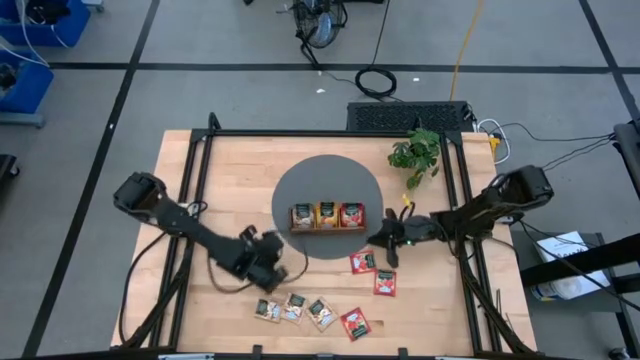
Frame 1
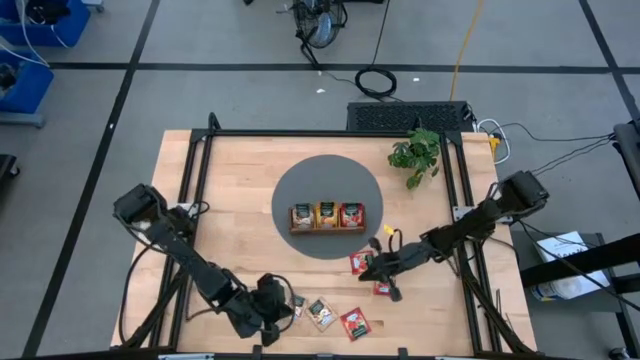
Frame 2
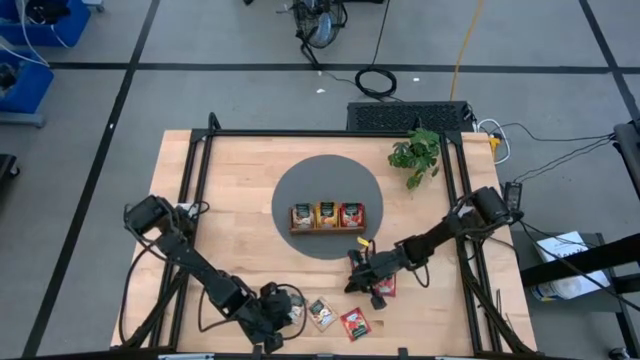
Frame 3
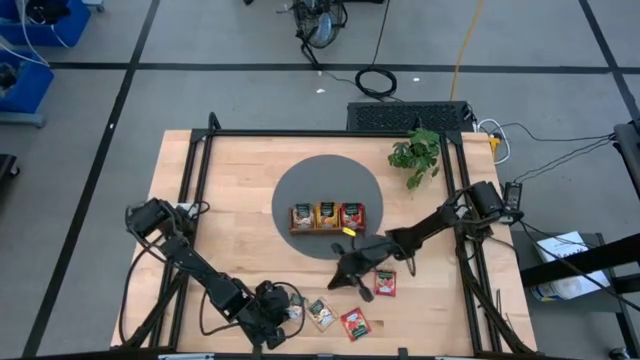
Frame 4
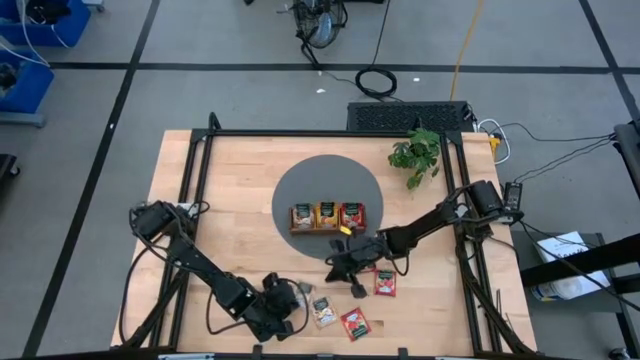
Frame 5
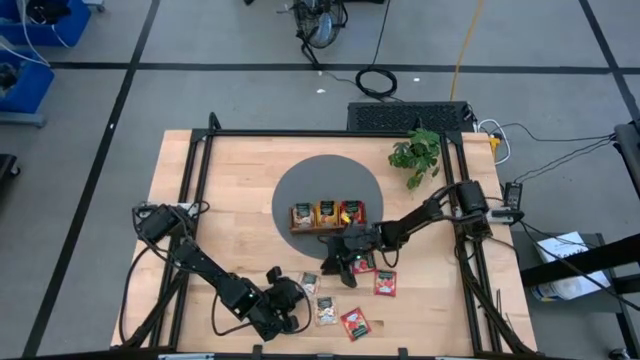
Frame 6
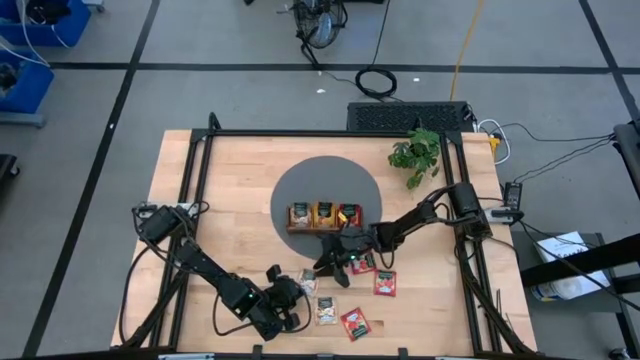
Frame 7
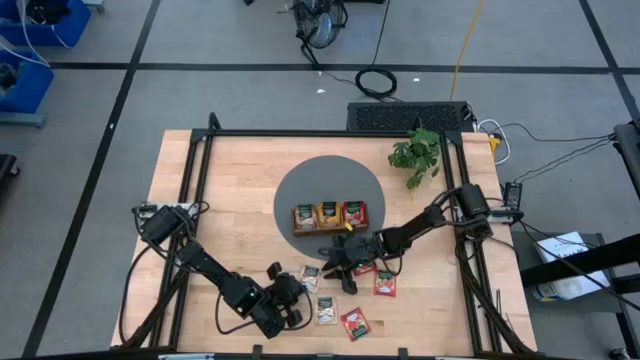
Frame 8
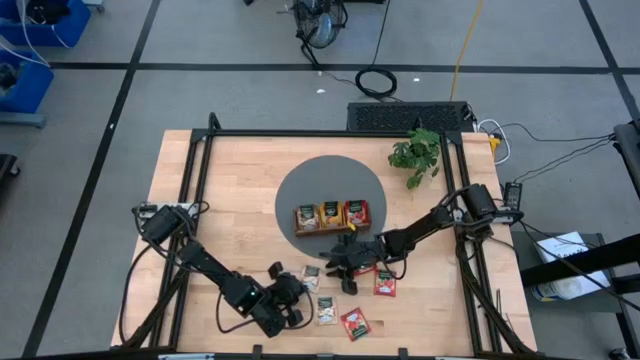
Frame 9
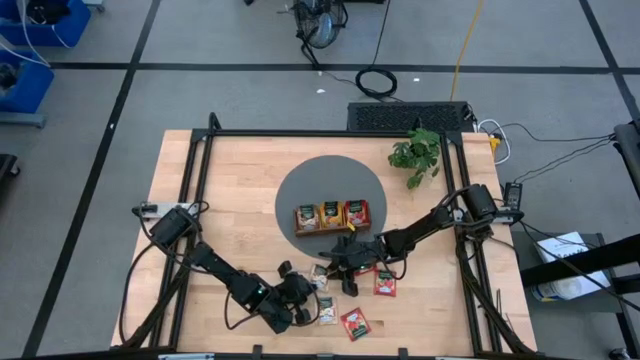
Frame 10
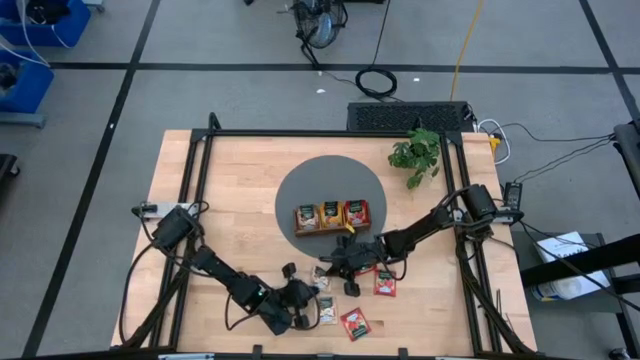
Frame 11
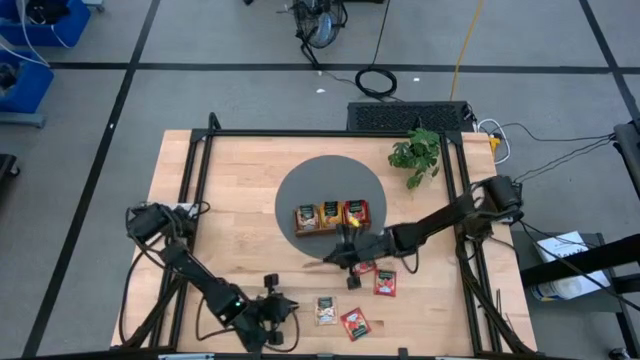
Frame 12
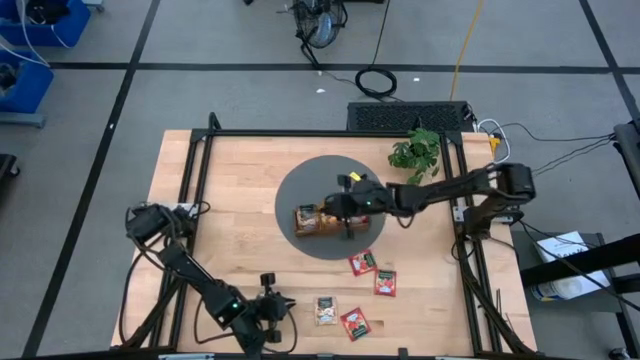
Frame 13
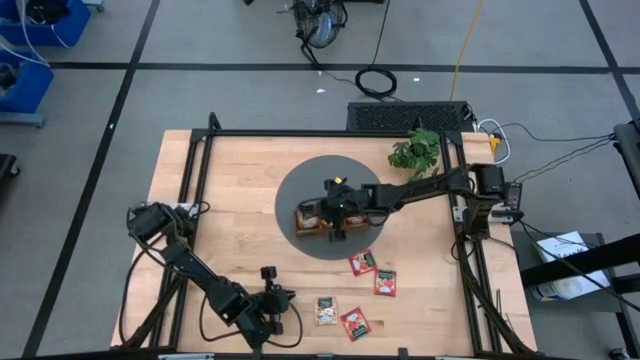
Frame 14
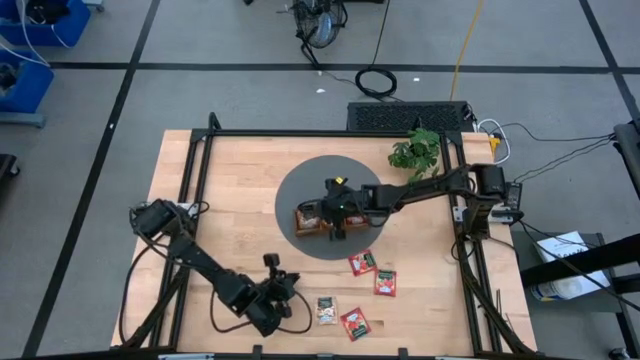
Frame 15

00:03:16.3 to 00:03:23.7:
Task: Pick & Place Tea
Put the cinnamon tea sachet into the left compartment of the wooden organizer

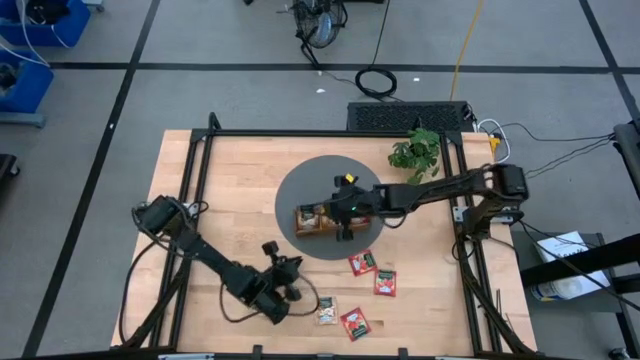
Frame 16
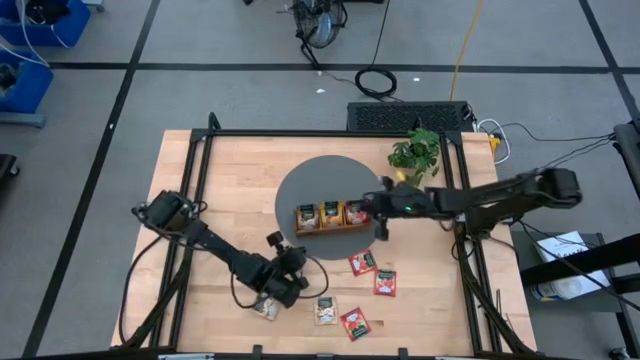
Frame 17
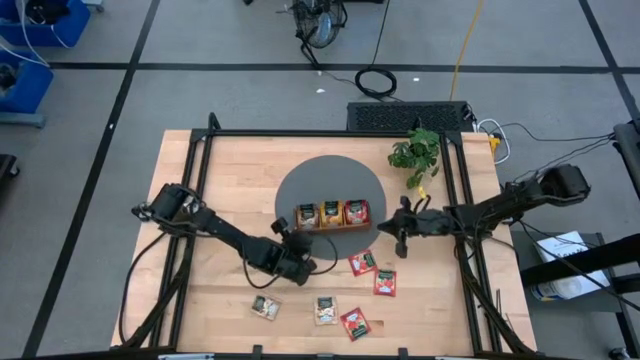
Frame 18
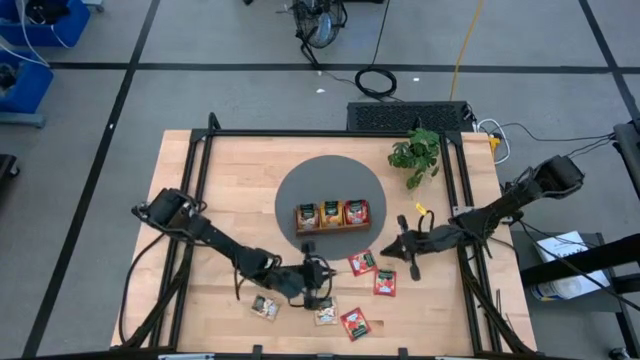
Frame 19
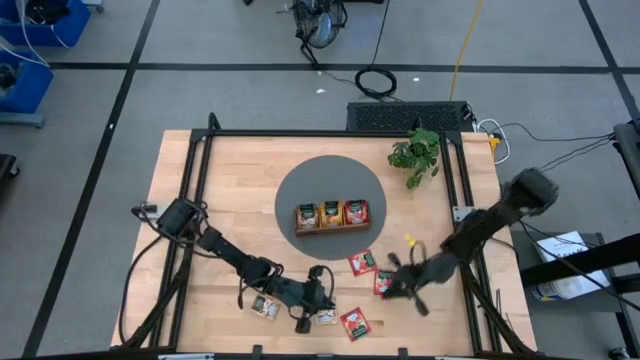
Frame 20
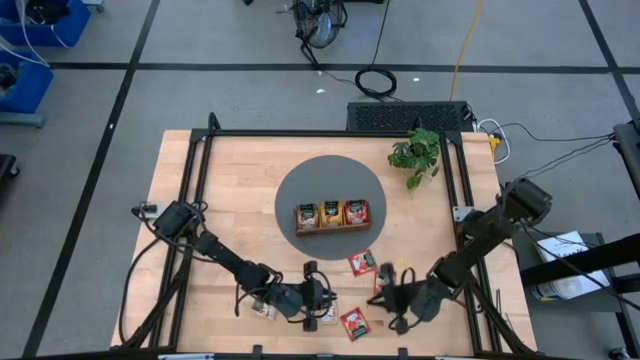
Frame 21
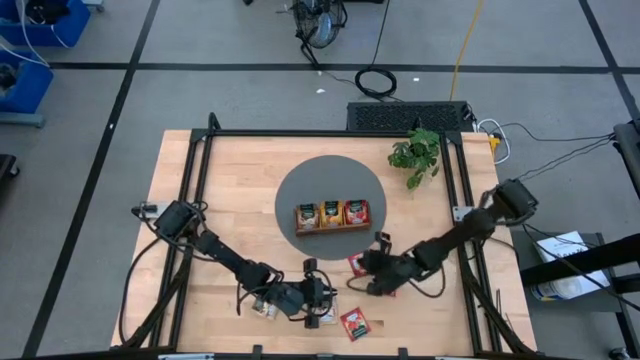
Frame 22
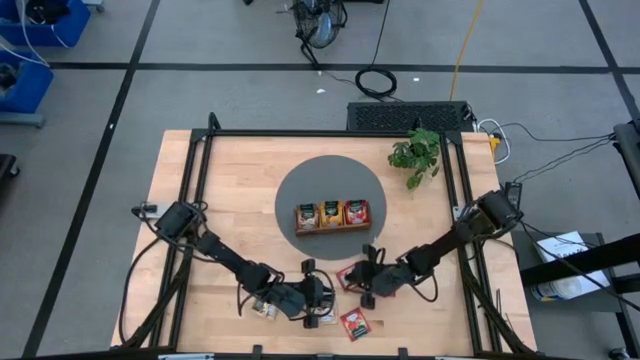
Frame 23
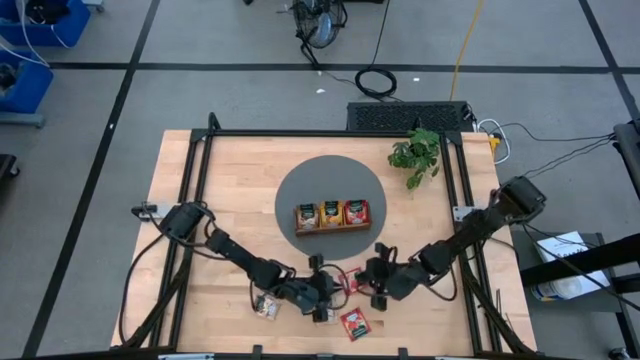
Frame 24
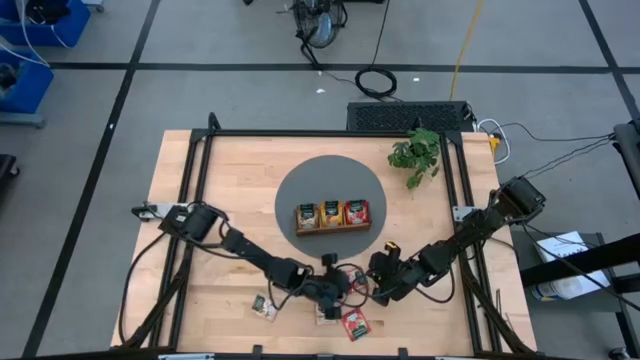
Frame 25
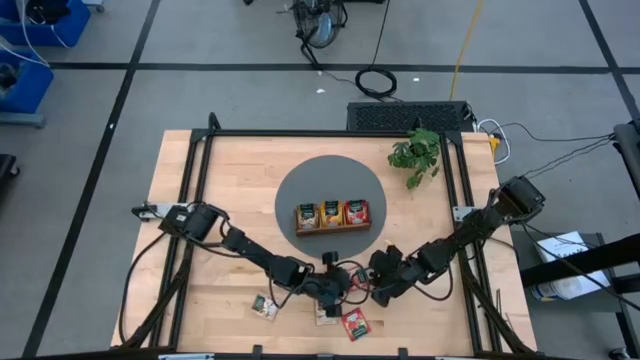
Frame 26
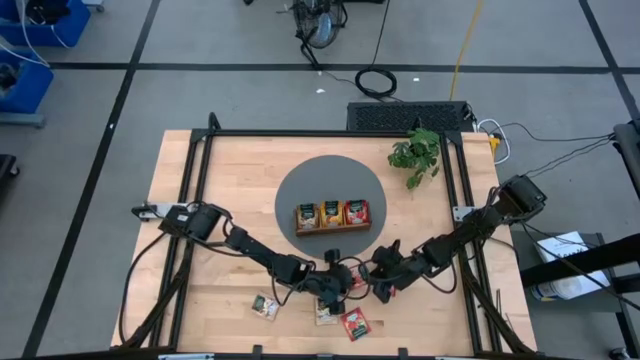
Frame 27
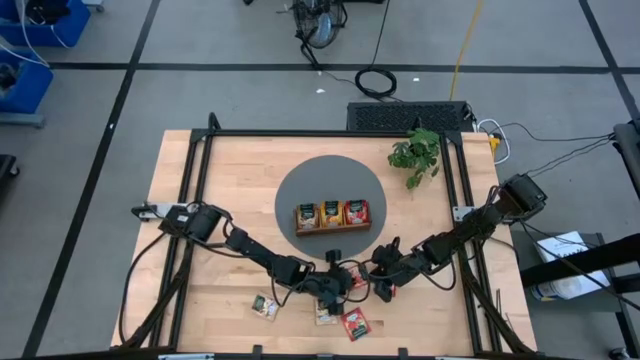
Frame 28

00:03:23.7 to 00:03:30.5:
Put the strawberry tea sachet into the right compartment of the wooden organizer

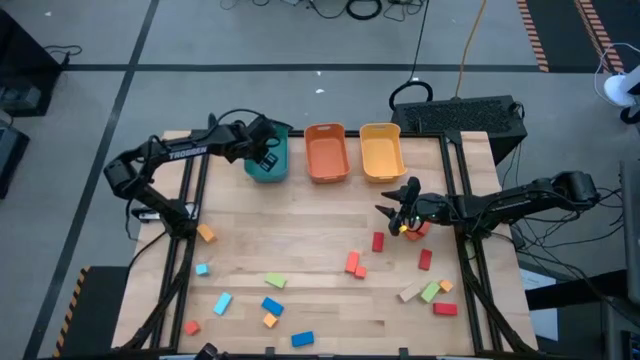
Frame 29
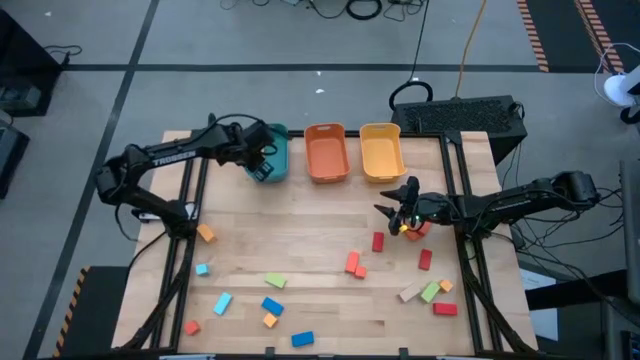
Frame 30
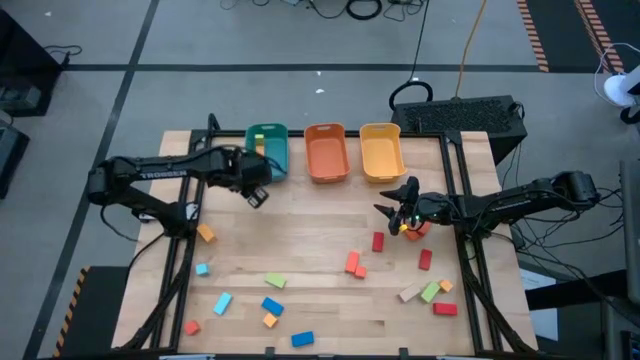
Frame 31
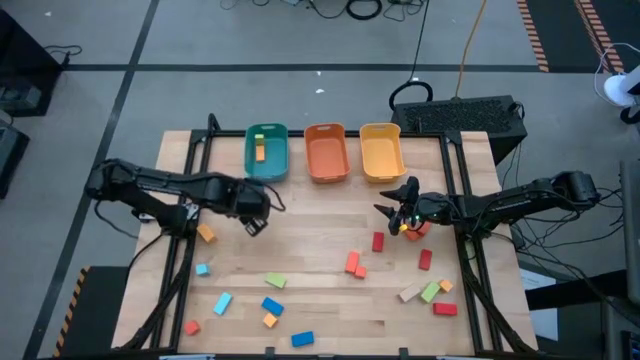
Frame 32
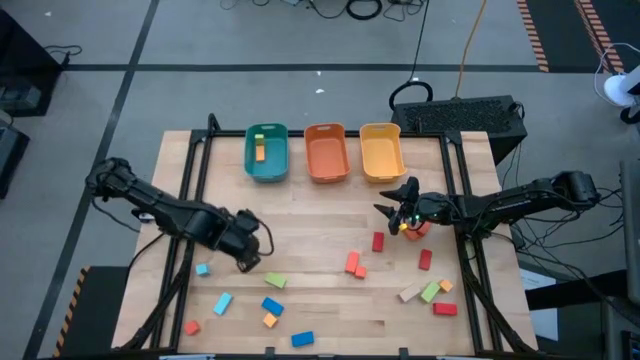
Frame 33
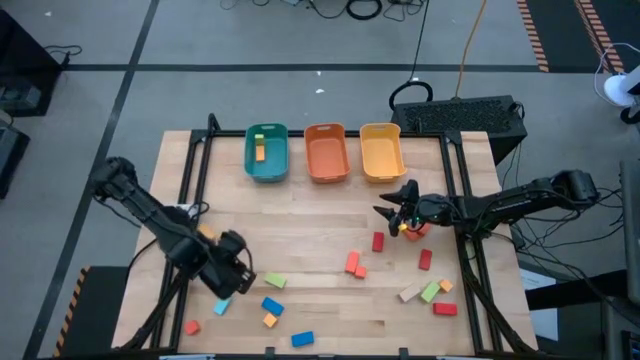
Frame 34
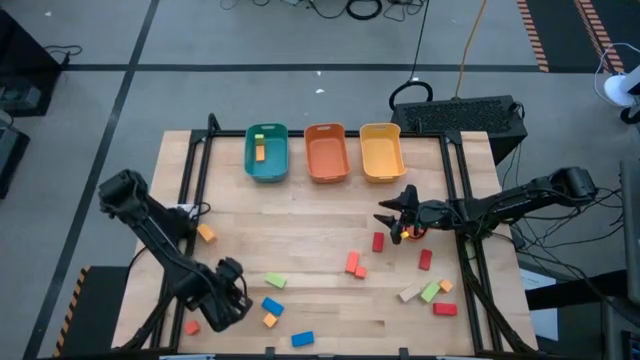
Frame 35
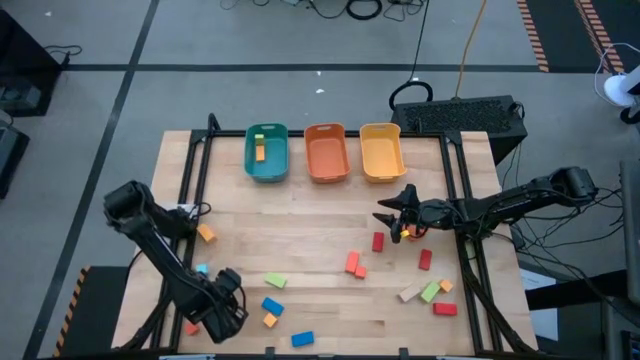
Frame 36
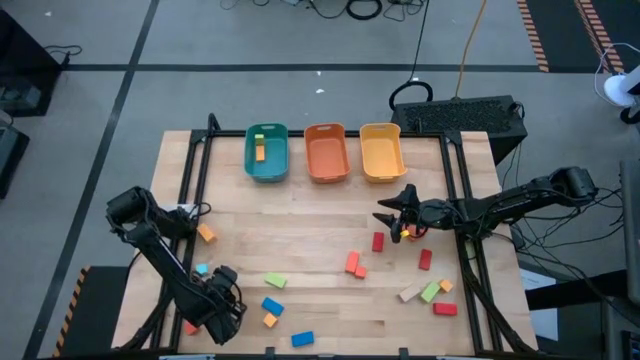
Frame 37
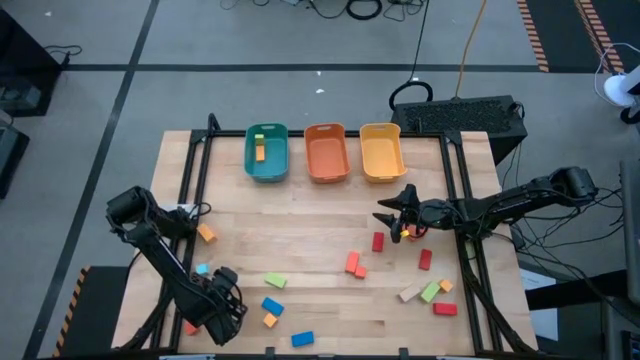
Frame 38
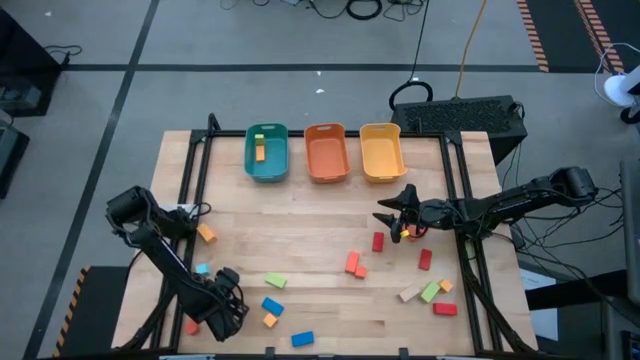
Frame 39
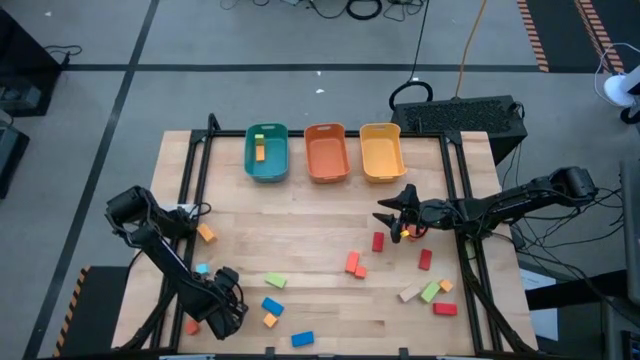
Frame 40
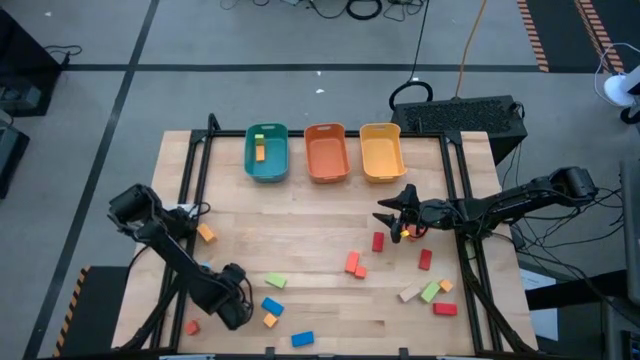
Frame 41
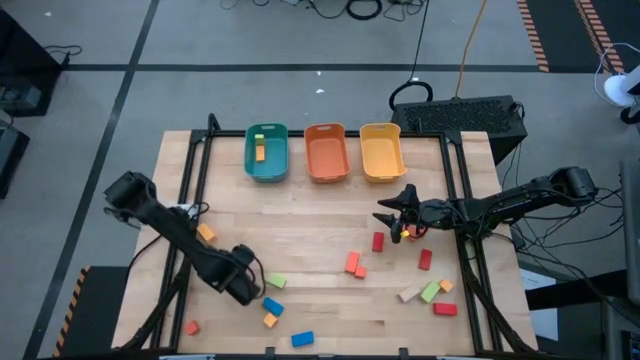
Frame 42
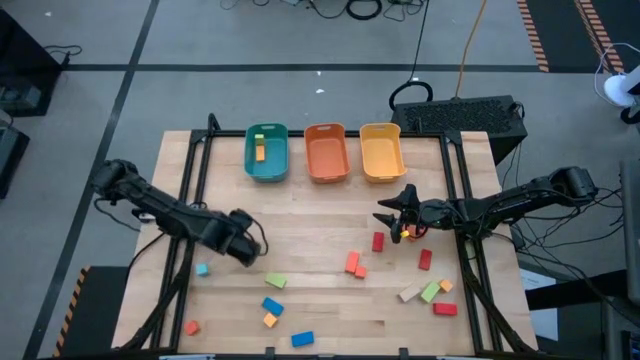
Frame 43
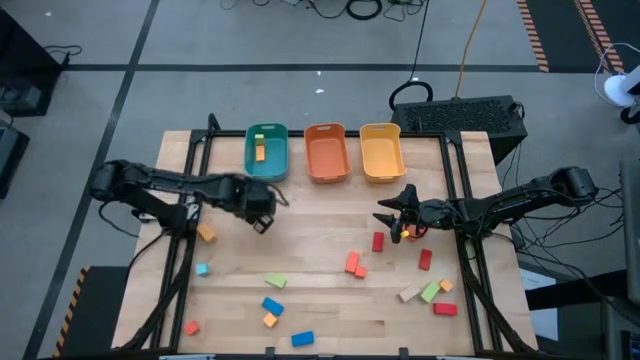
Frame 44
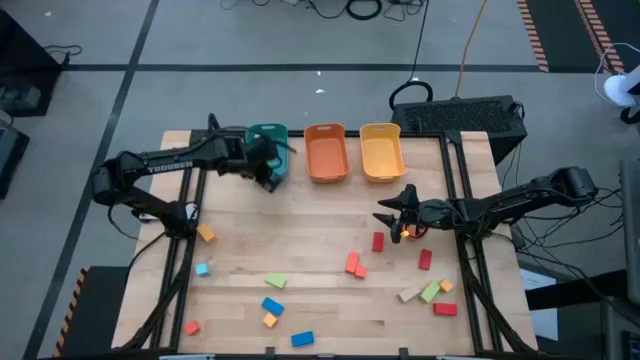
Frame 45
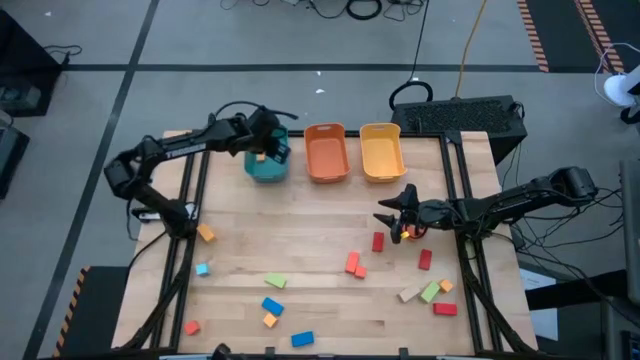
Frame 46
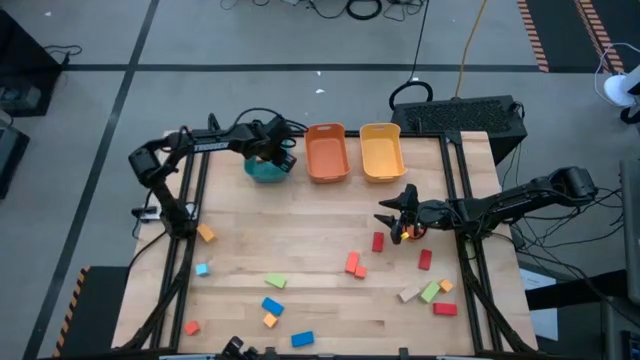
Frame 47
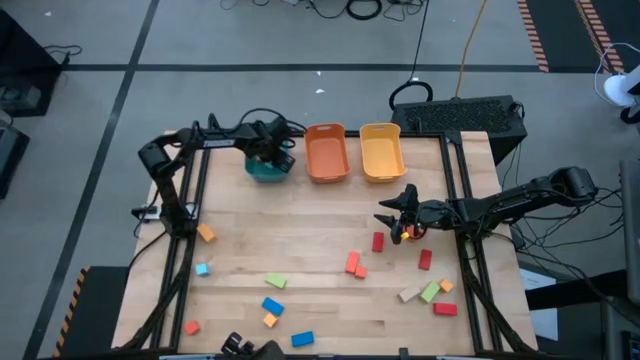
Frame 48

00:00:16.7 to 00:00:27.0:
Task: Sort blocks by size
Put the light blue thin rectangular block into the blue bin
